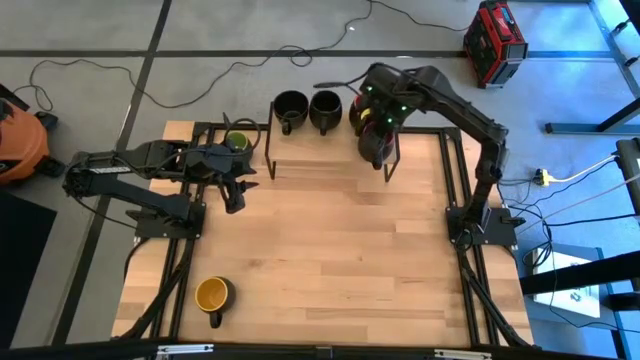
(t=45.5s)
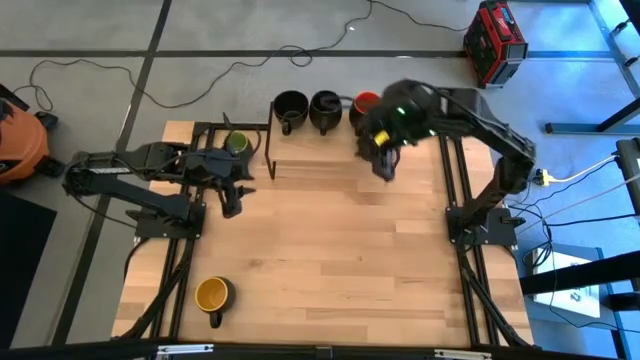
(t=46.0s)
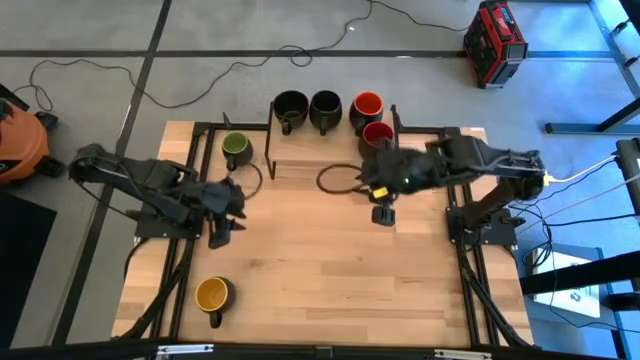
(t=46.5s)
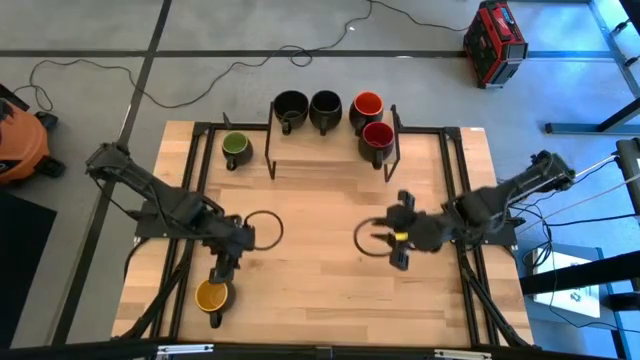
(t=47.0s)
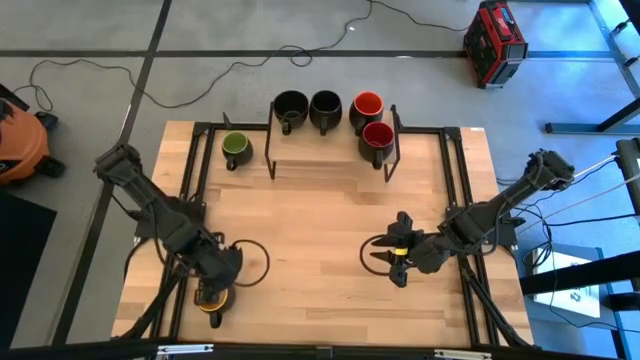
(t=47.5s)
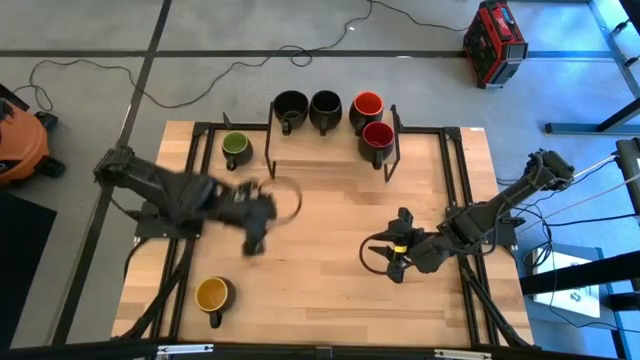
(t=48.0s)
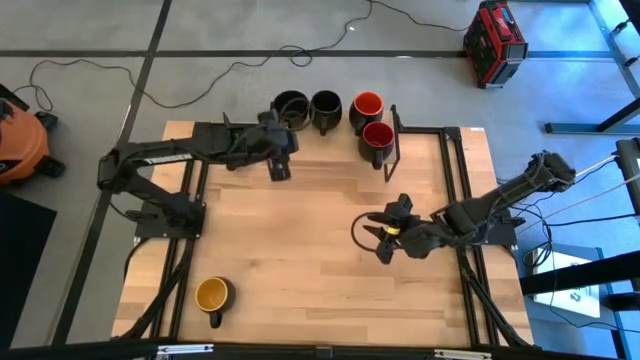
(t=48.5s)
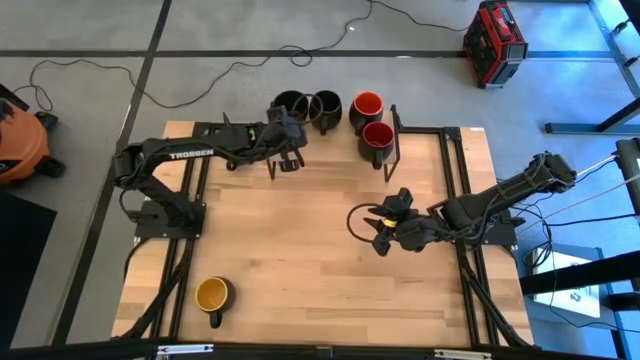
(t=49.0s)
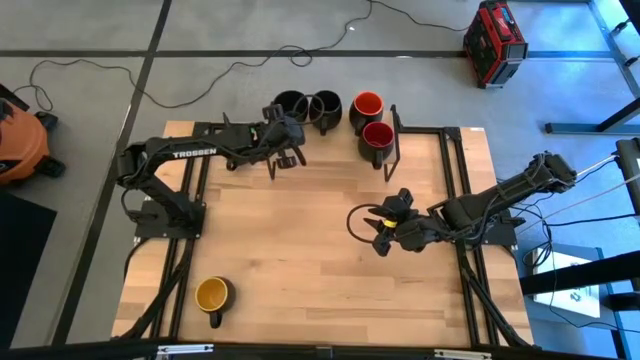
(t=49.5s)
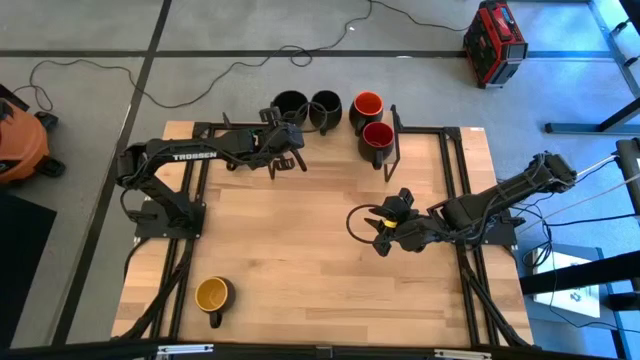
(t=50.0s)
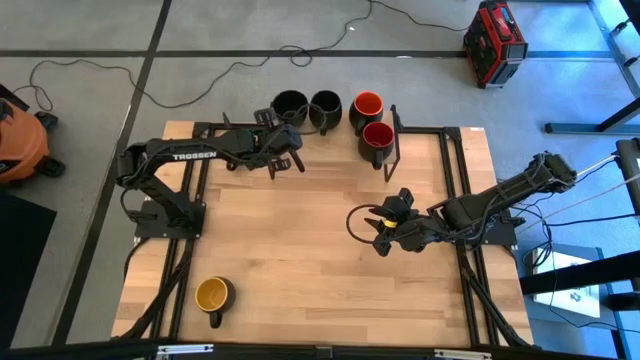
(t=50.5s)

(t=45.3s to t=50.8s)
Task: Place coffee mugs
Adjust the black mug

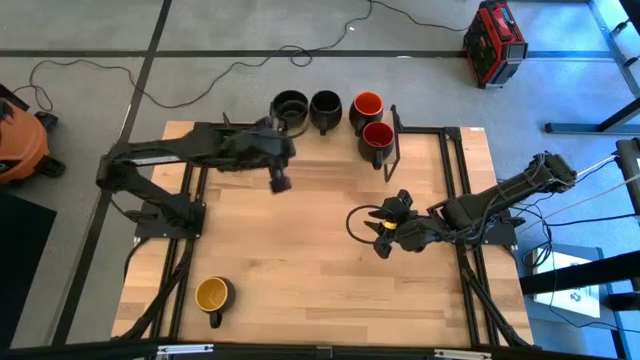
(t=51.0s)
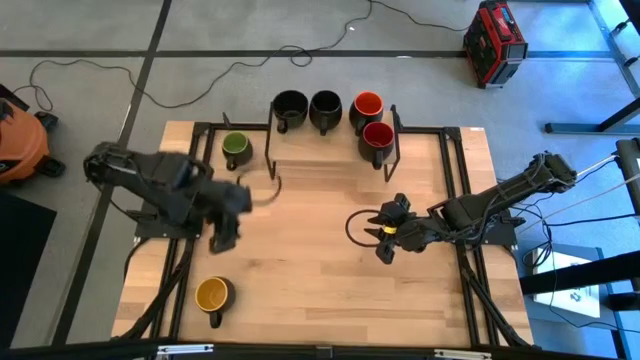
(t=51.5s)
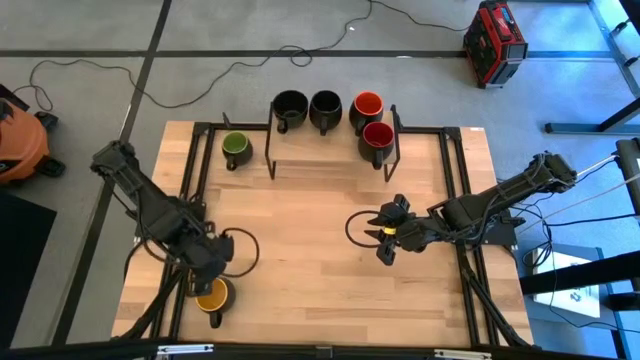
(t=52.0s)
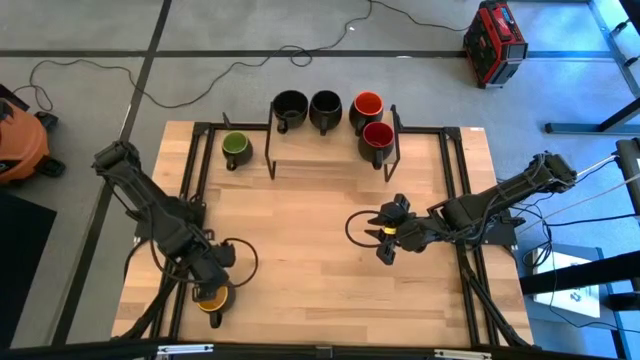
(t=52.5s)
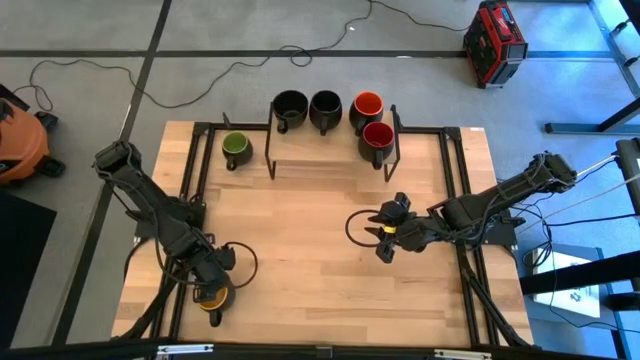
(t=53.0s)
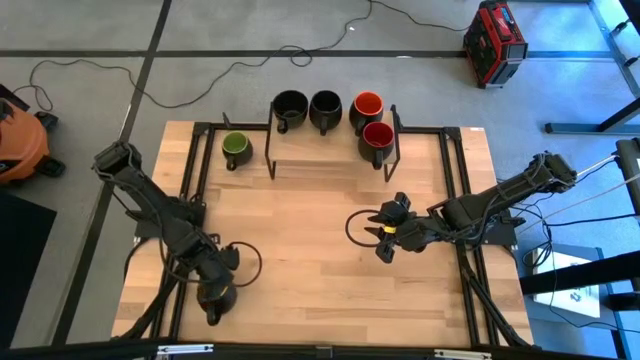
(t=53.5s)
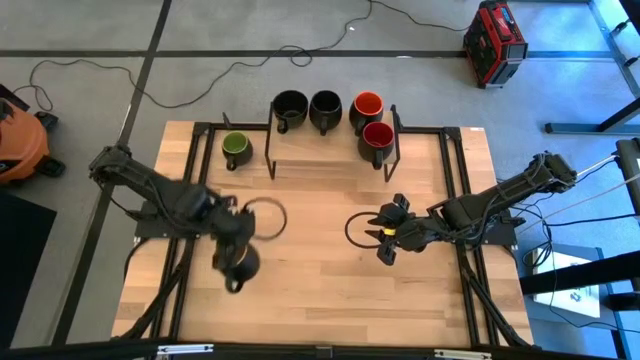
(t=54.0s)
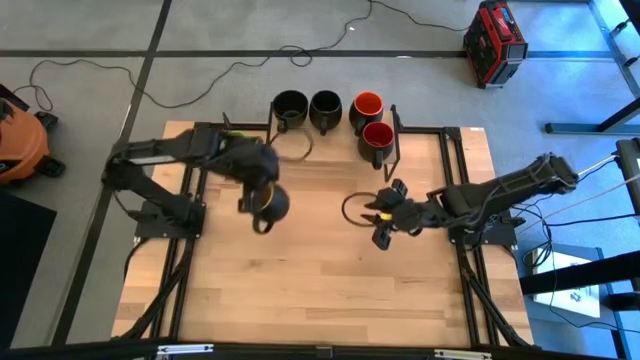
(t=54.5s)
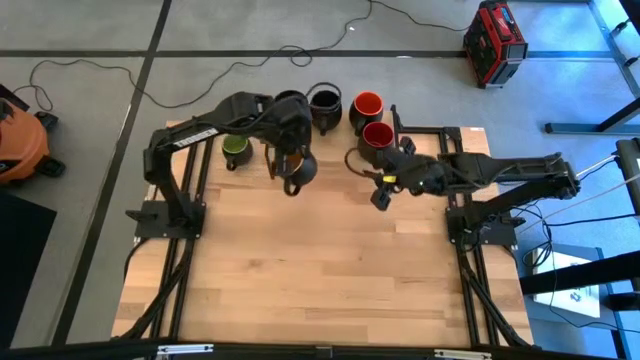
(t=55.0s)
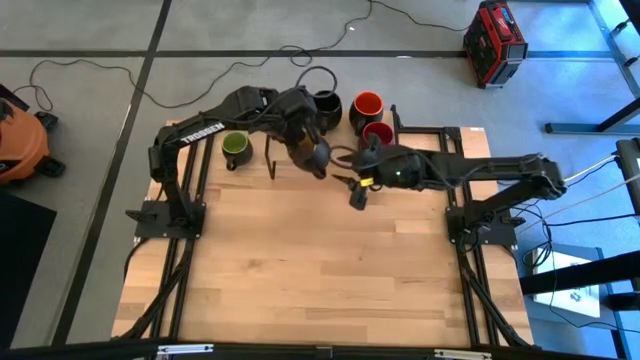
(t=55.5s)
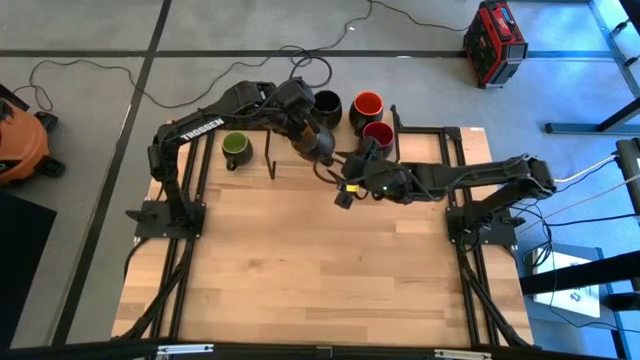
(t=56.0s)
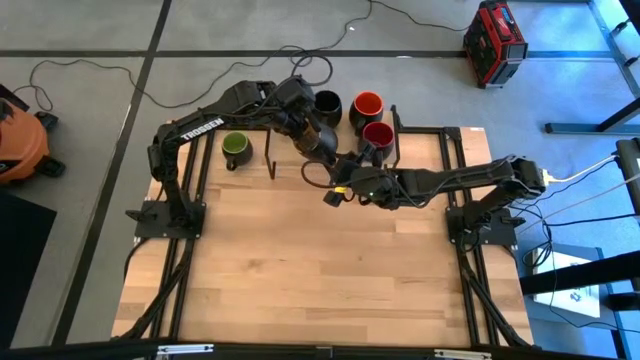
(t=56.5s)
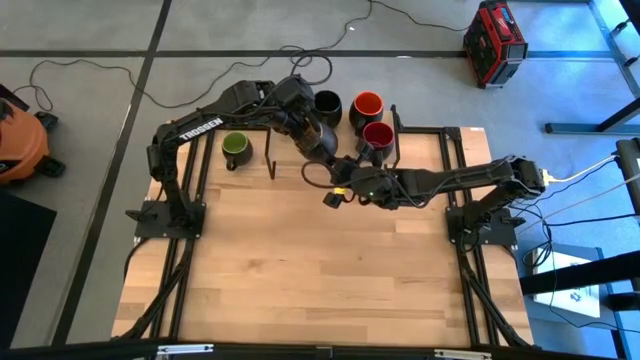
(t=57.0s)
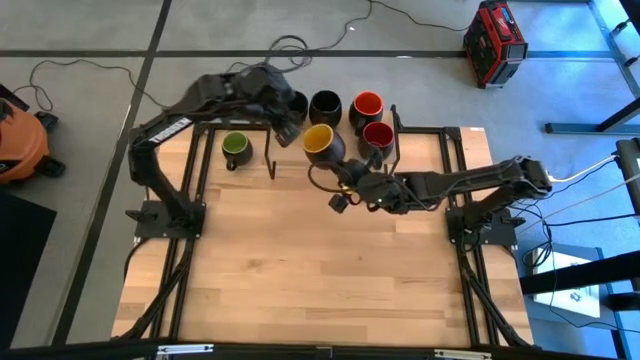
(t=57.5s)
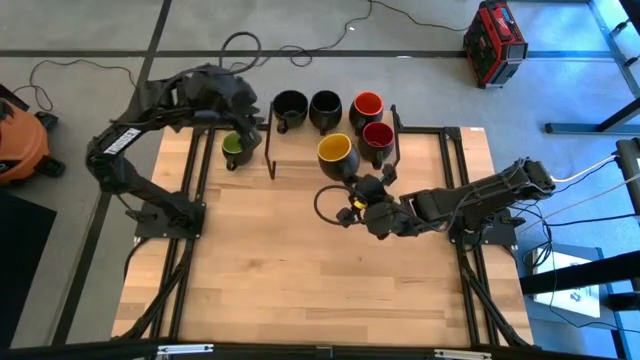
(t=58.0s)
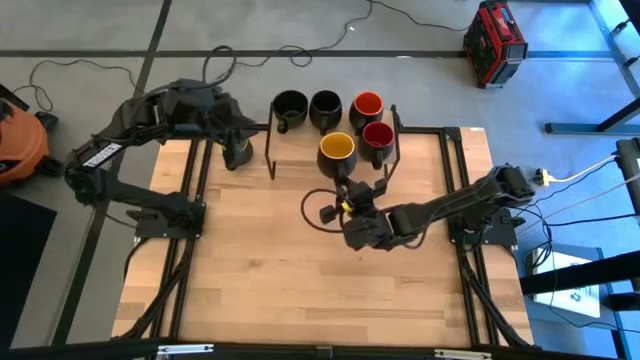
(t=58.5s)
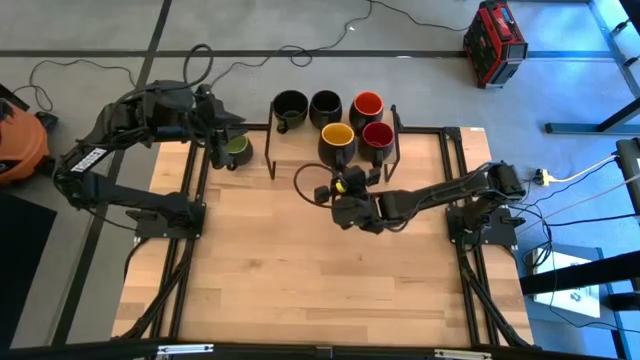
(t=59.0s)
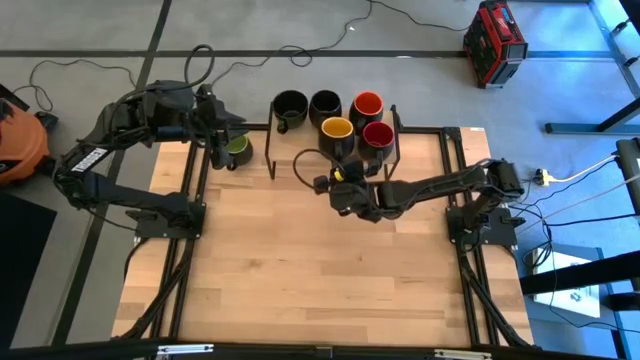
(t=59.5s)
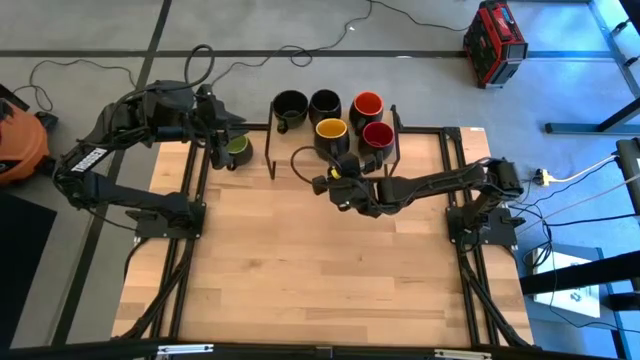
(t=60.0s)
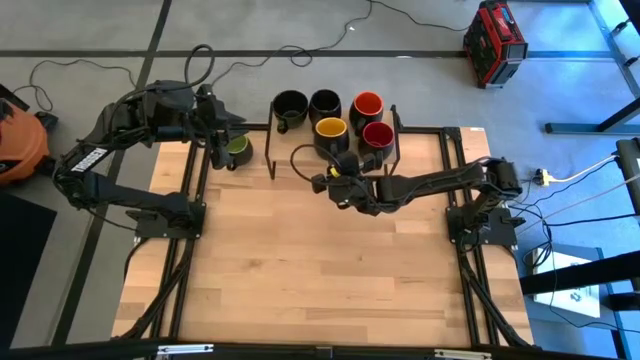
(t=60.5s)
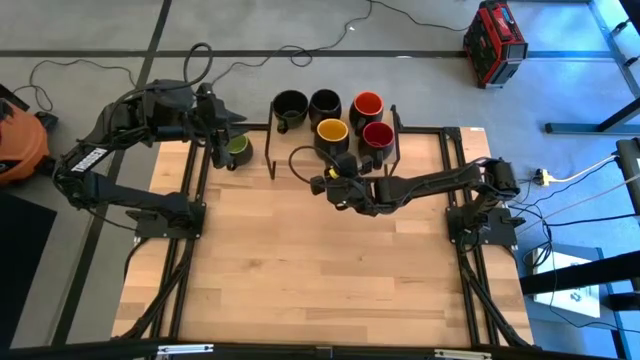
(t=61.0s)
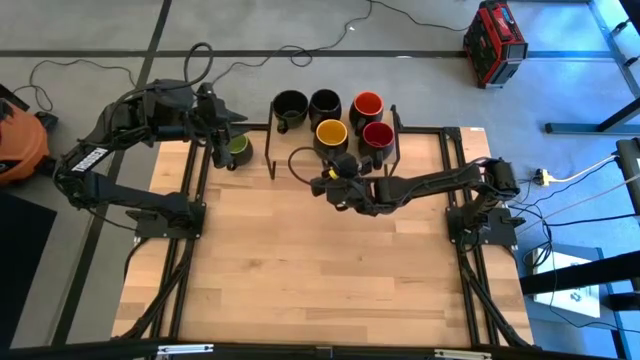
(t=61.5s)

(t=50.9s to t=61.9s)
Put the yellow mug on the shelf

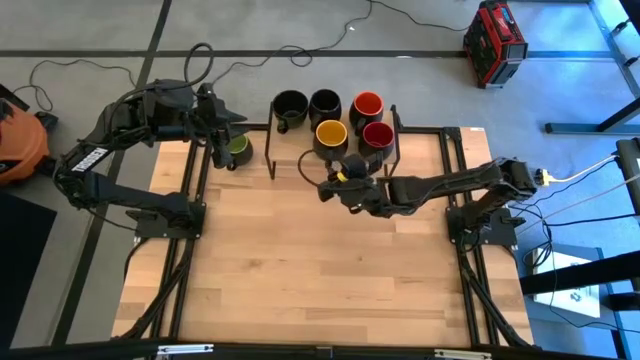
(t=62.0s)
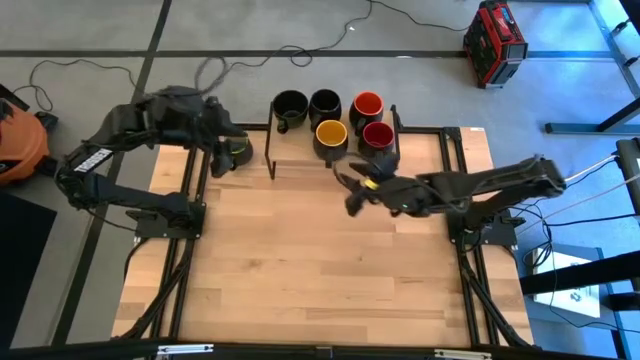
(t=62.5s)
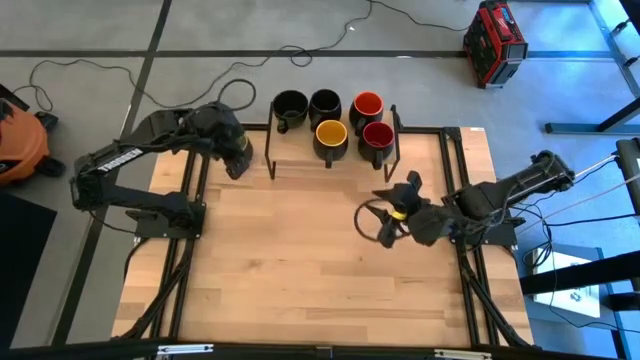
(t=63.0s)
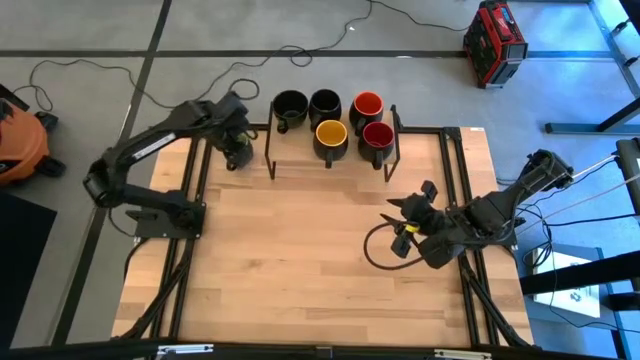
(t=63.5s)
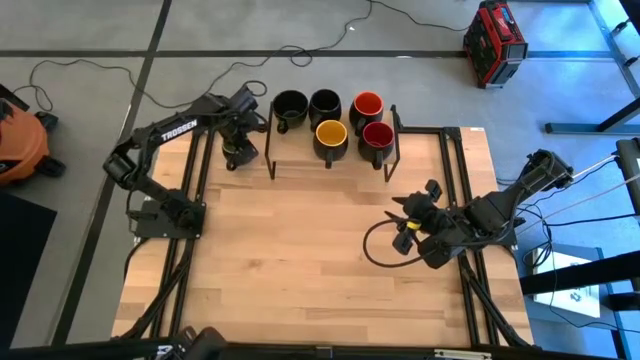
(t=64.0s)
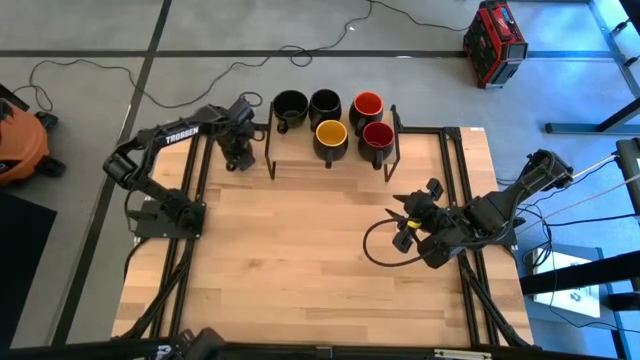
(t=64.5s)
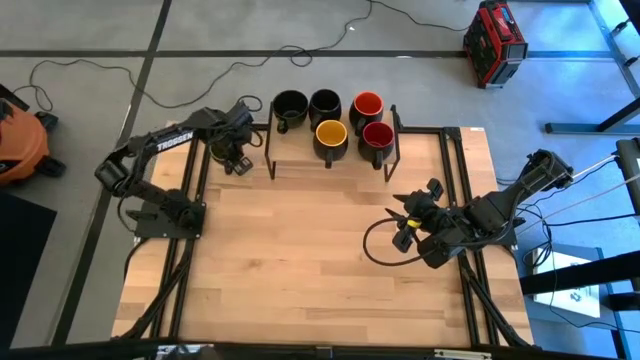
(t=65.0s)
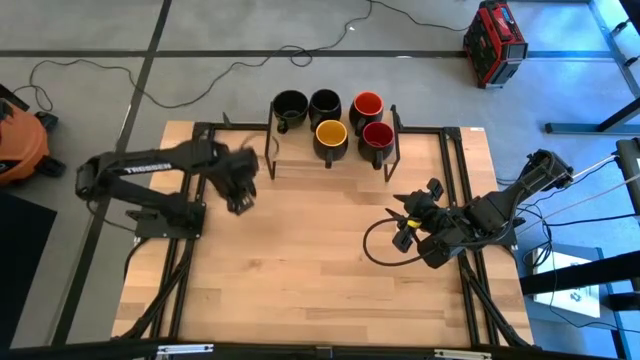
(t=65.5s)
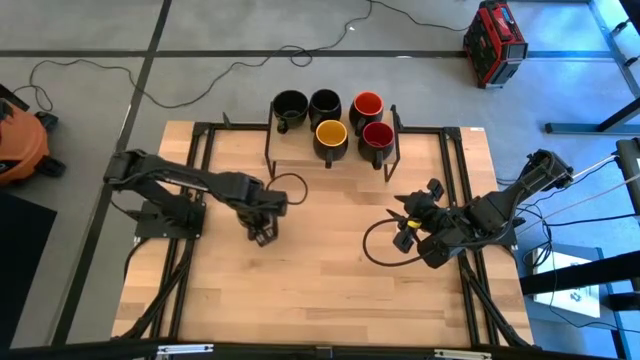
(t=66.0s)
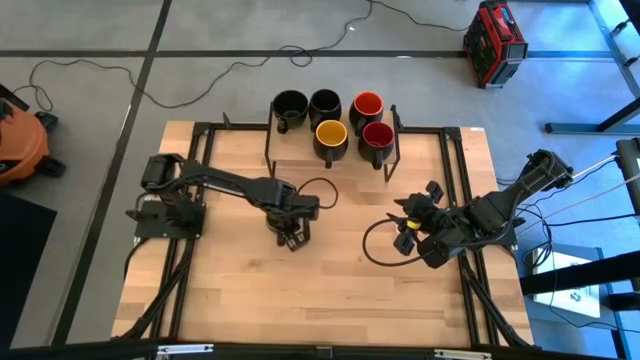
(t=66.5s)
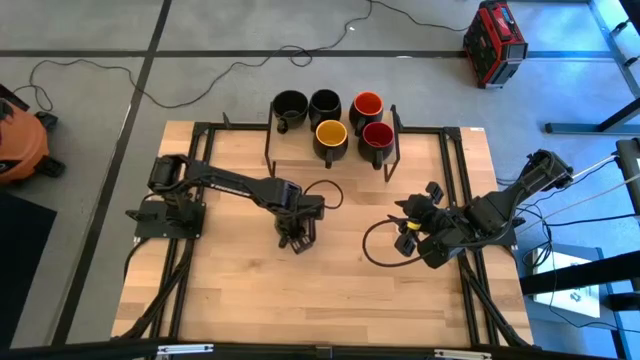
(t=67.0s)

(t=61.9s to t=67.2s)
Move the green mug to the right center of the table
